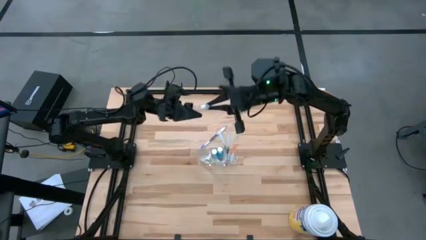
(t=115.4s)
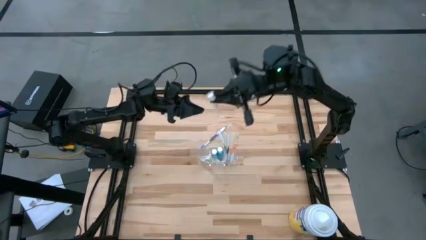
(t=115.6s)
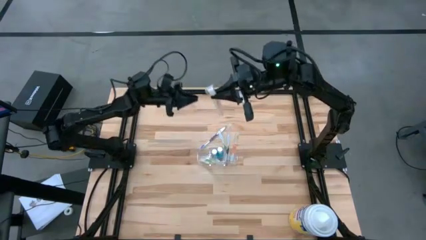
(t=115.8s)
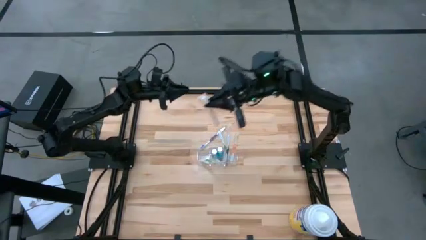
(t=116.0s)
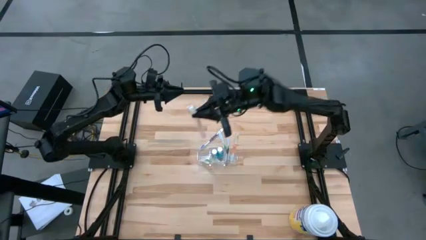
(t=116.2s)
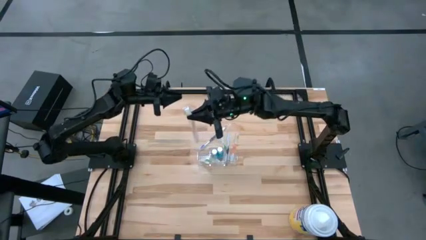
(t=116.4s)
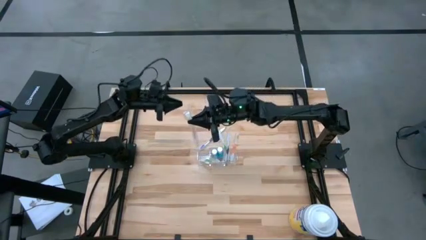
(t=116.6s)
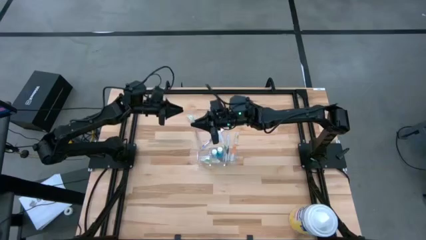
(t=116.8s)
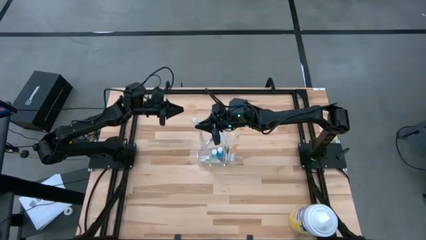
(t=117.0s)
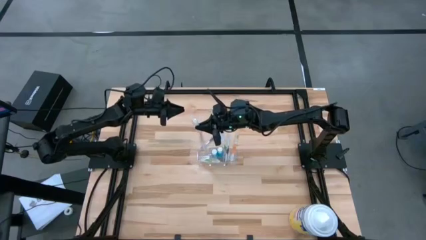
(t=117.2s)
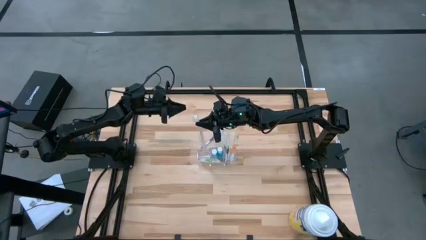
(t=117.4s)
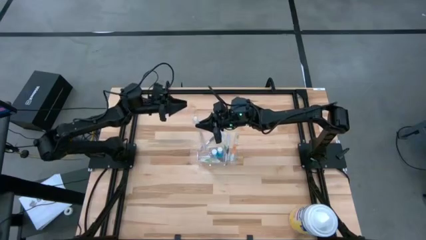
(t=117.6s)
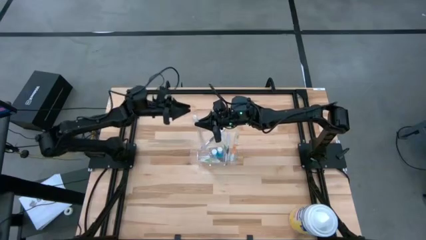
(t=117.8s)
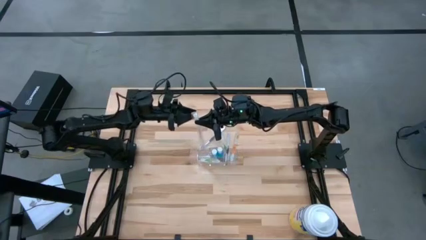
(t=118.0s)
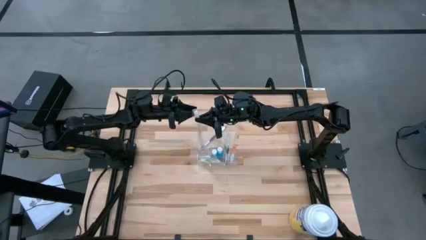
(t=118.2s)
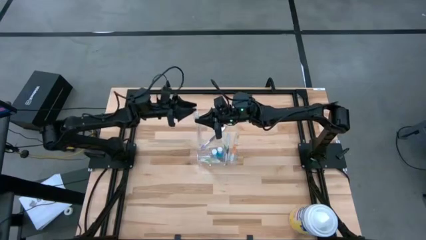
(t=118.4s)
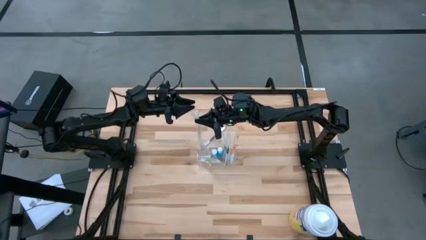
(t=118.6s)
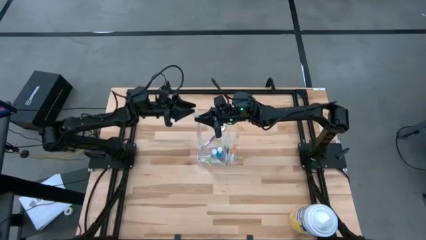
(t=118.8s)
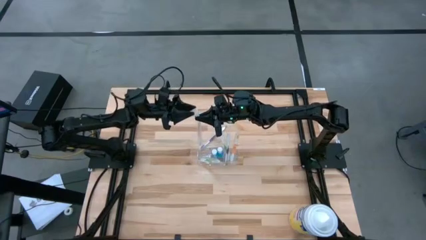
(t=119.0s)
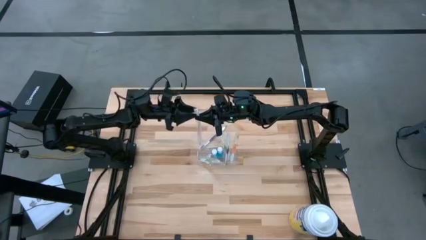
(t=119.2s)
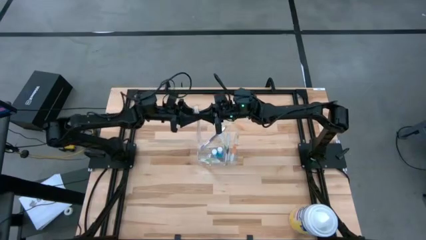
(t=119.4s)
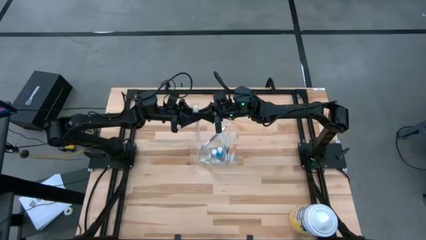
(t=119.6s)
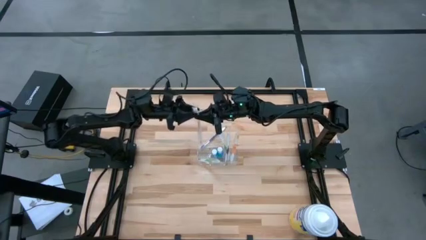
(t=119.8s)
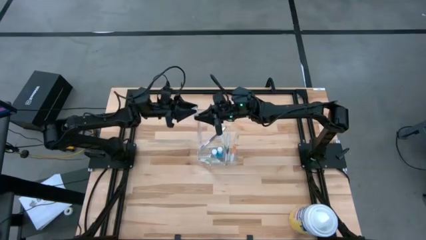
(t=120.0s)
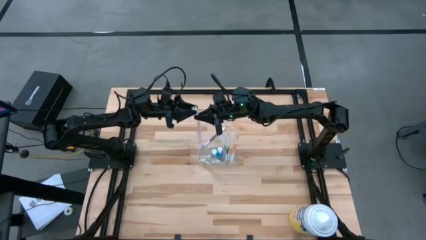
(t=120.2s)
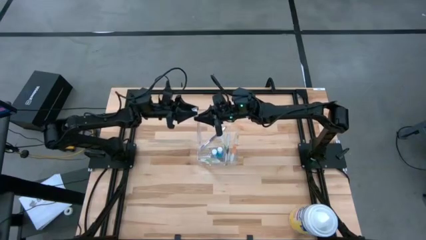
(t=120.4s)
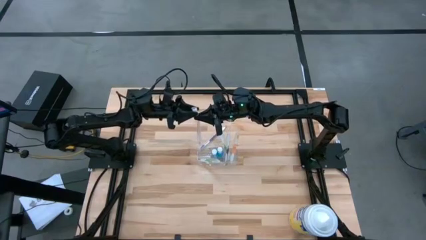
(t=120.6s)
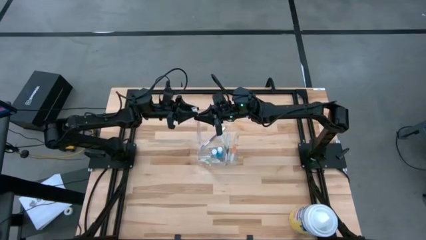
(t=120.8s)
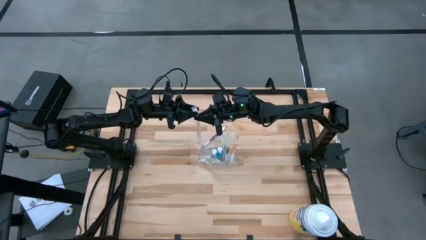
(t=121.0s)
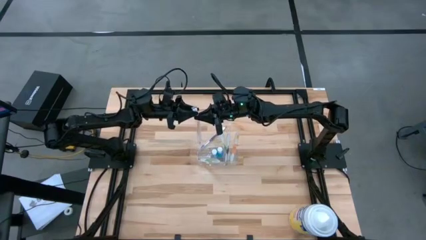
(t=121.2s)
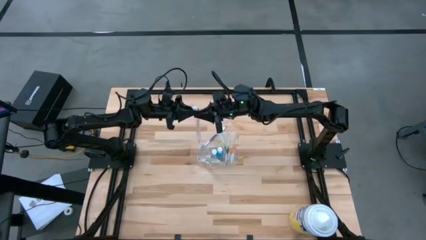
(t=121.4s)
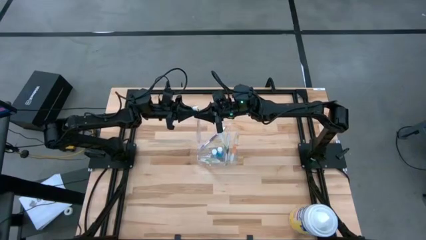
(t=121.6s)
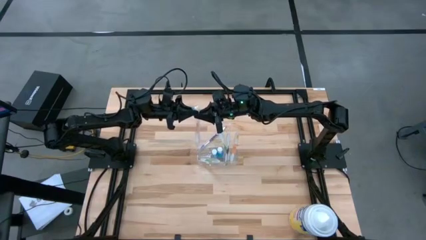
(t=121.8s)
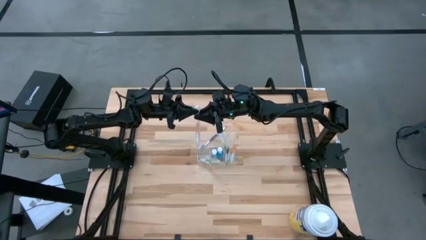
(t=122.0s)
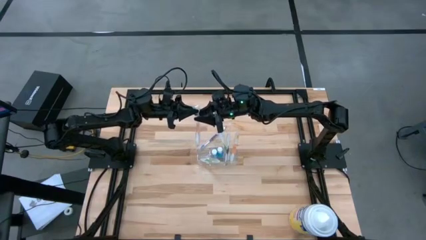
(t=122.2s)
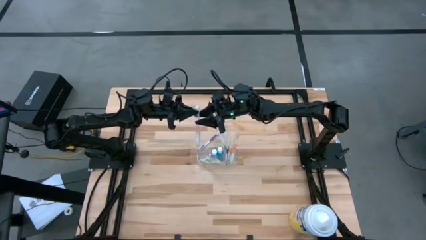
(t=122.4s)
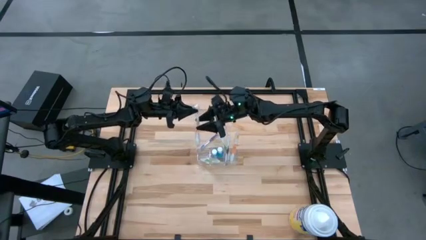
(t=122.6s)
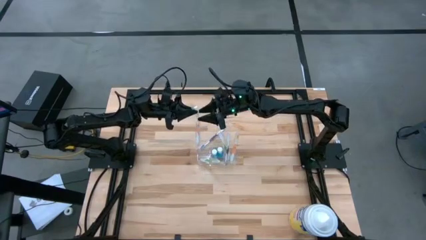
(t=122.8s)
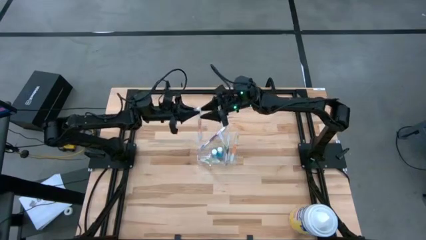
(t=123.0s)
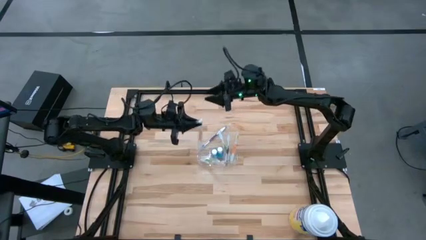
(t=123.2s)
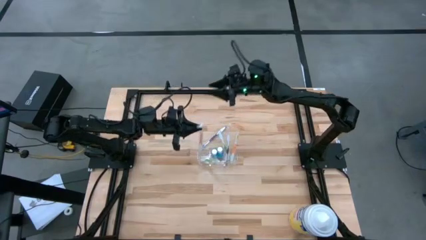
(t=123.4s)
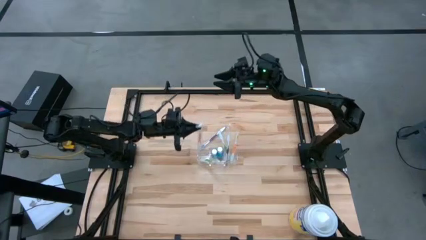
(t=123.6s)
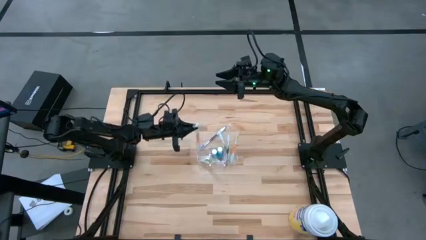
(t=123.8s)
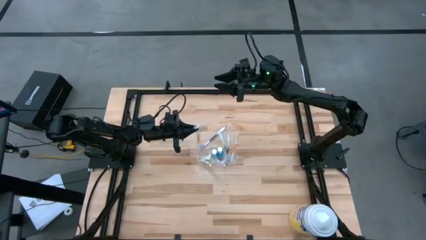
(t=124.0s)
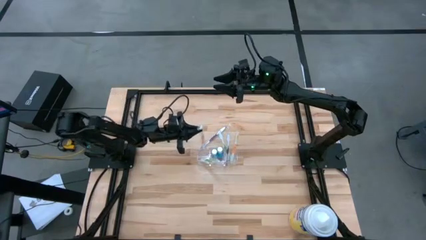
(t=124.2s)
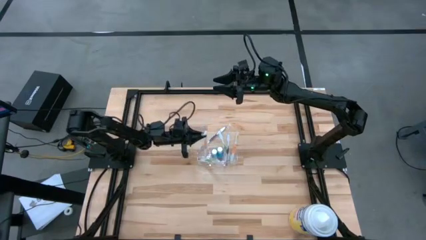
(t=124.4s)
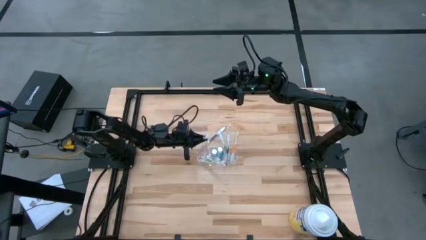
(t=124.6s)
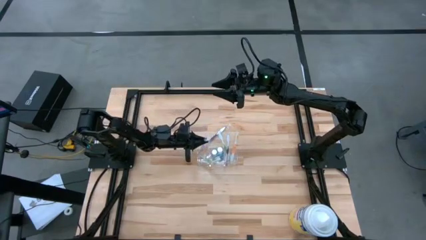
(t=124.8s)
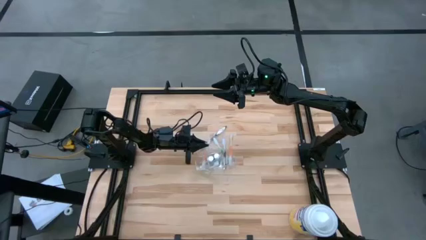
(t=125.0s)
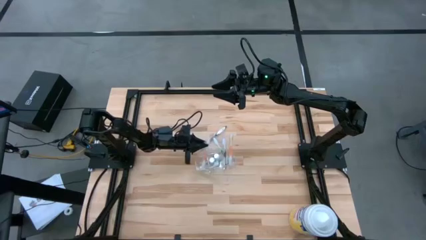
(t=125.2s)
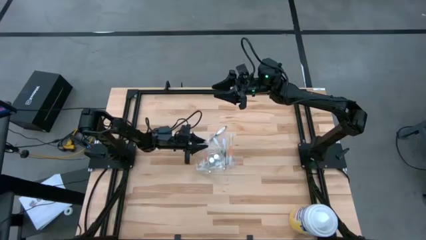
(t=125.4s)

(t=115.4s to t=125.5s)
Task: Pick & Place toothbrushing station
Put the orange toothbrush into the transparent organizer

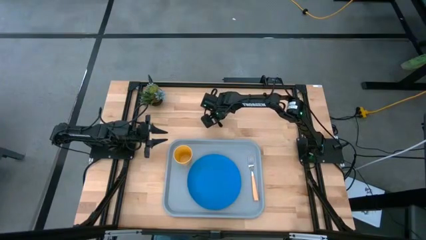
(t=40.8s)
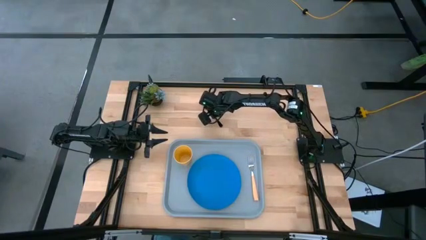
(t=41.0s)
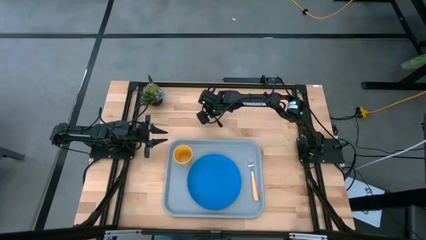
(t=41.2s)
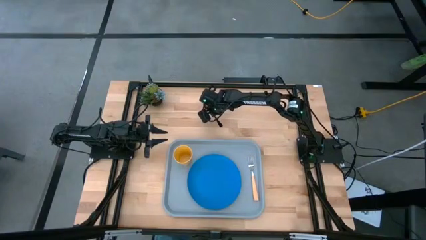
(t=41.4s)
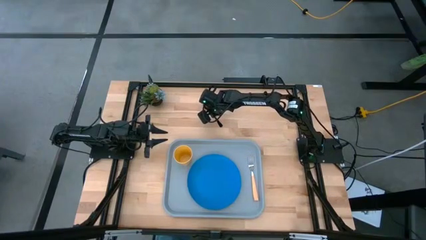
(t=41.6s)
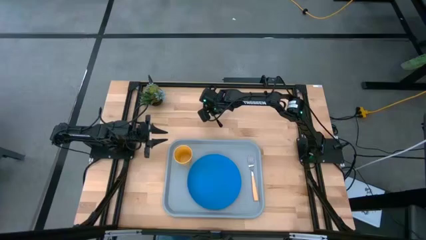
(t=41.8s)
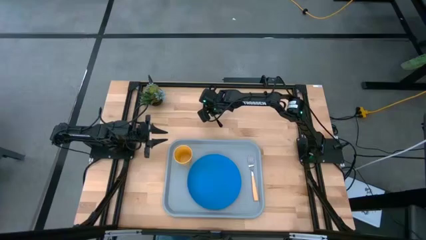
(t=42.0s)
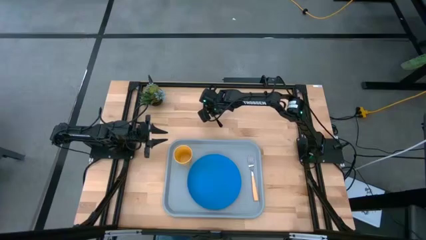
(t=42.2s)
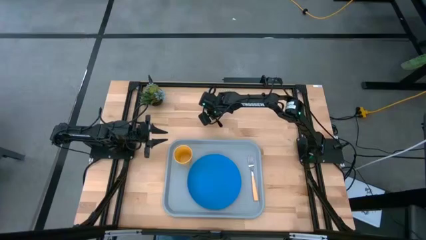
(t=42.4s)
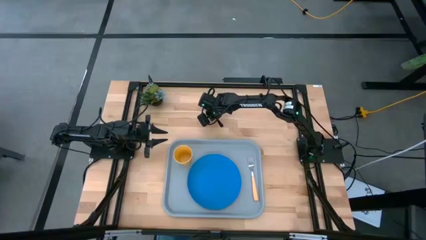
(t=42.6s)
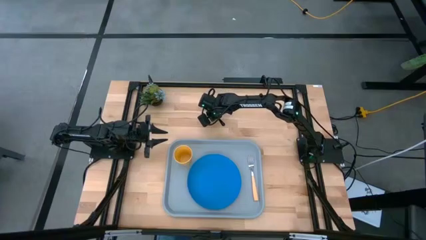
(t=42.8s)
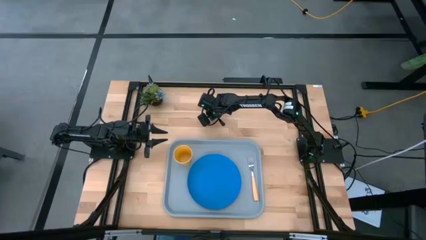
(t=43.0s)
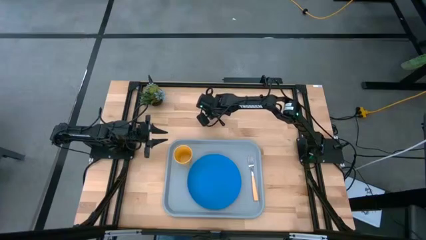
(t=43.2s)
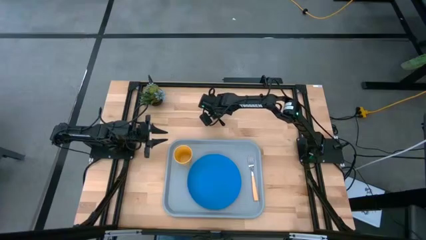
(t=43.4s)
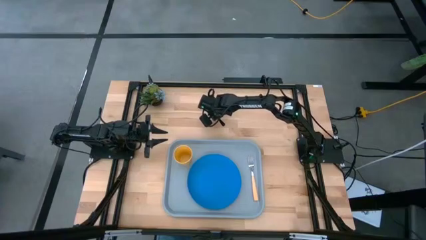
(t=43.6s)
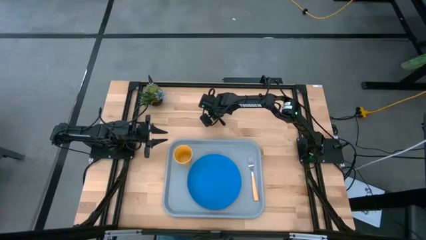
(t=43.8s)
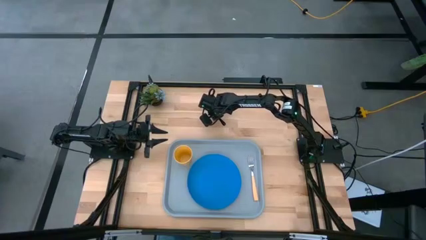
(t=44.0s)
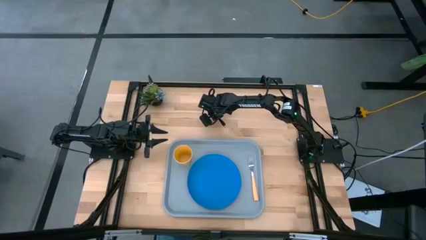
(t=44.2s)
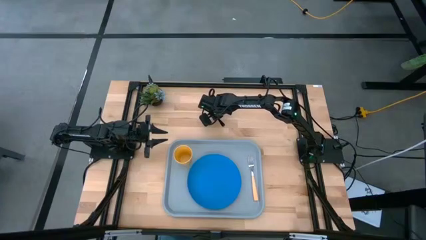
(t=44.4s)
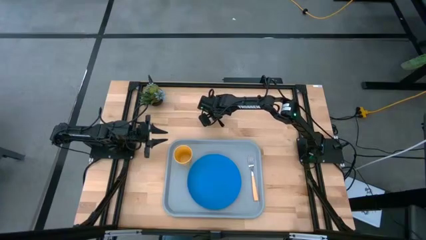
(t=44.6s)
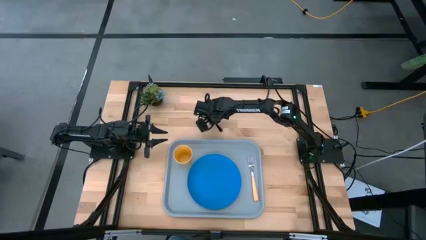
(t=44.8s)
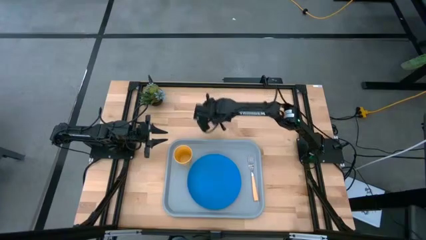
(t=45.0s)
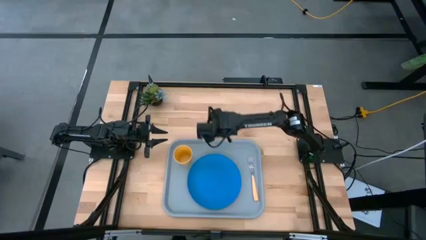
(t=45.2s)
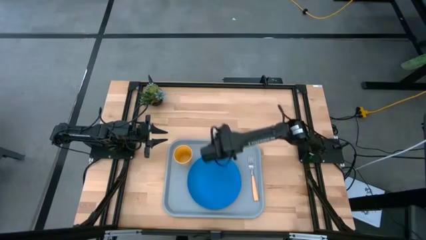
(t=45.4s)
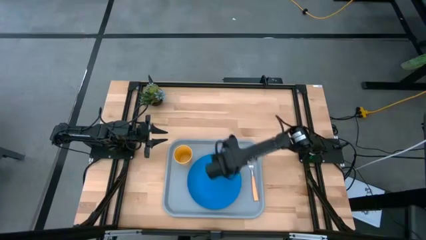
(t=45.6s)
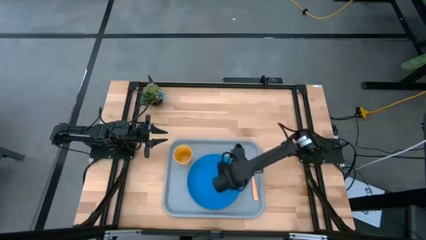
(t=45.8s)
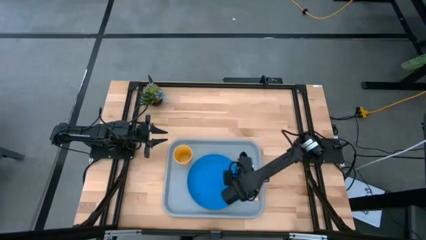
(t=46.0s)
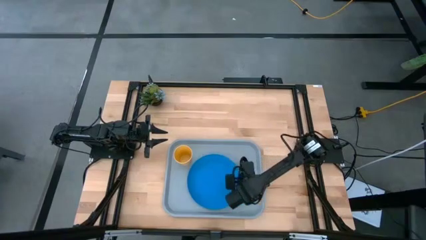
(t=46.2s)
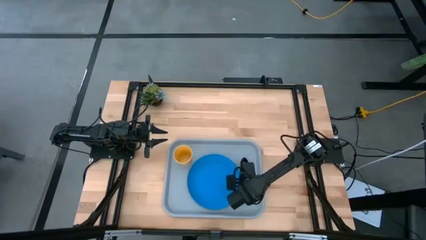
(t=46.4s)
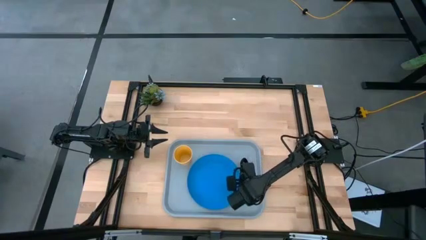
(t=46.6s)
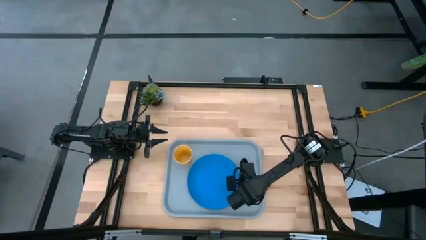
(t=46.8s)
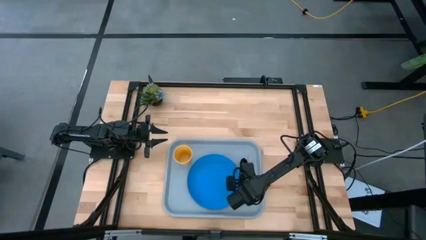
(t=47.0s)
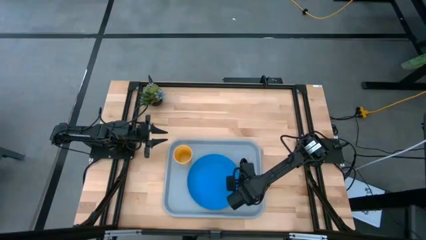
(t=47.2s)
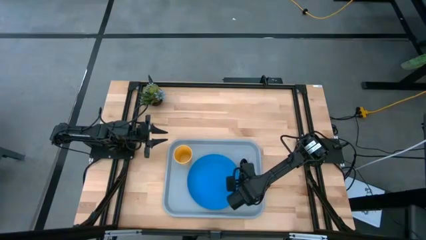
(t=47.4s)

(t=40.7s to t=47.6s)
Task: Pick and place plate/cup/fork/spoon on tray
Put the black spoon on the gray tray to the right of the blue plate
